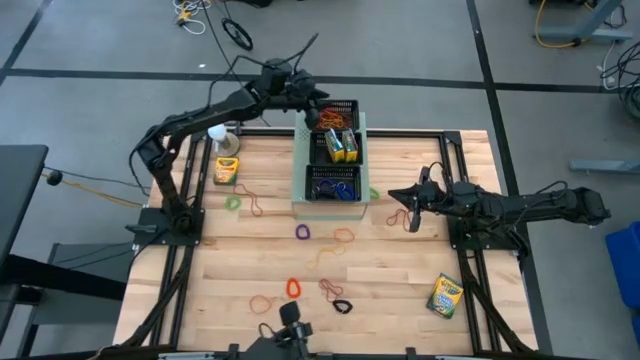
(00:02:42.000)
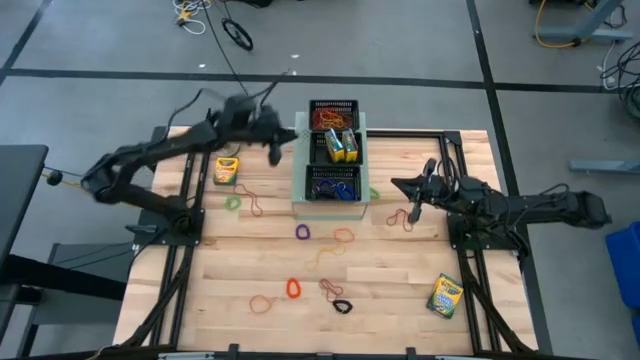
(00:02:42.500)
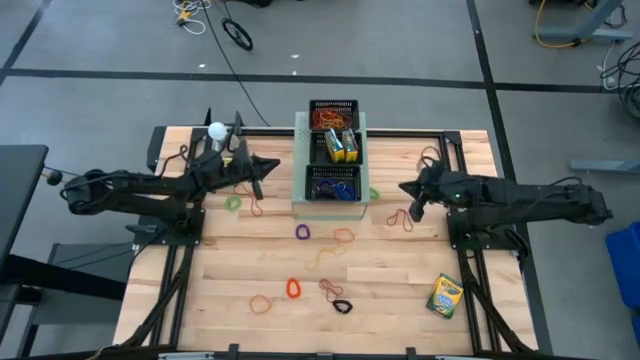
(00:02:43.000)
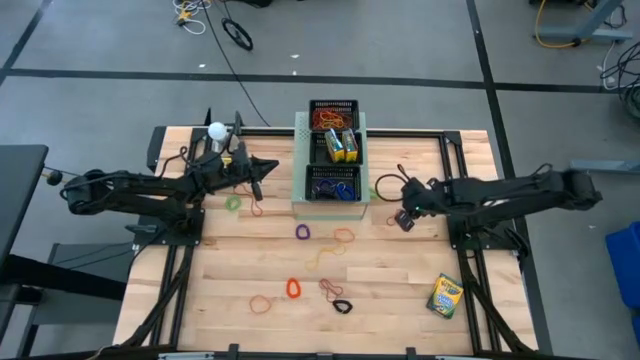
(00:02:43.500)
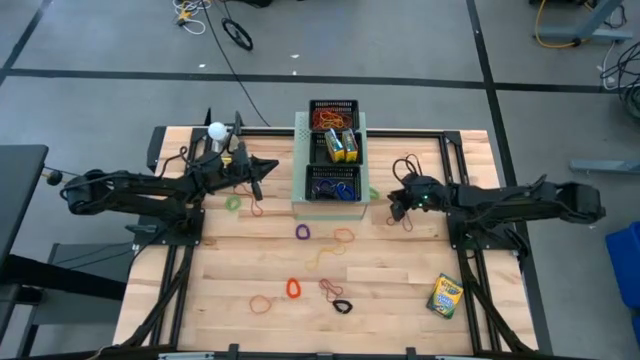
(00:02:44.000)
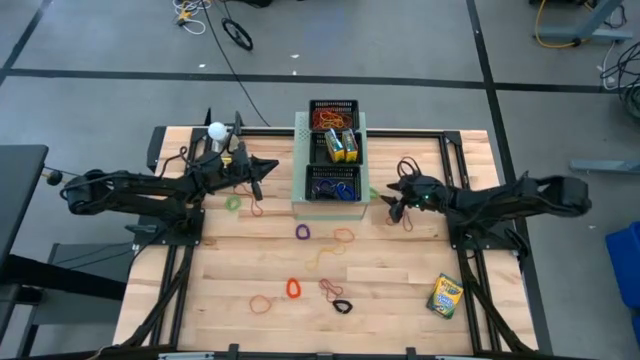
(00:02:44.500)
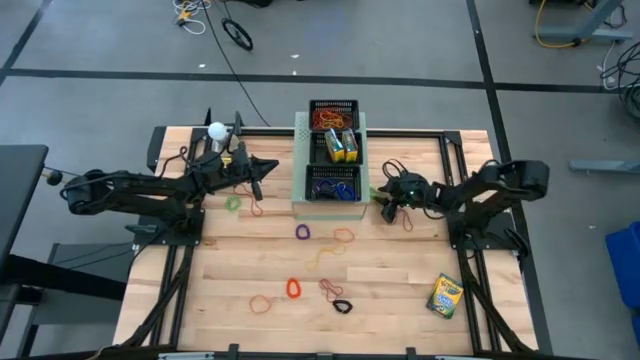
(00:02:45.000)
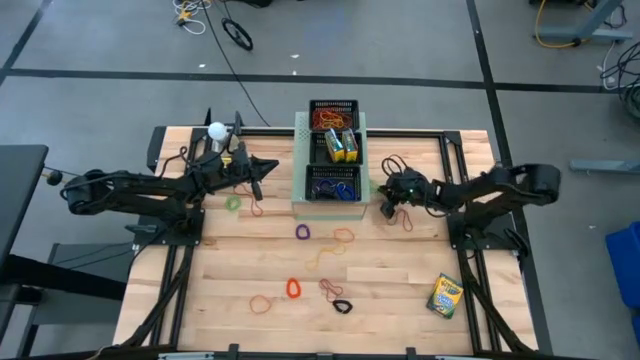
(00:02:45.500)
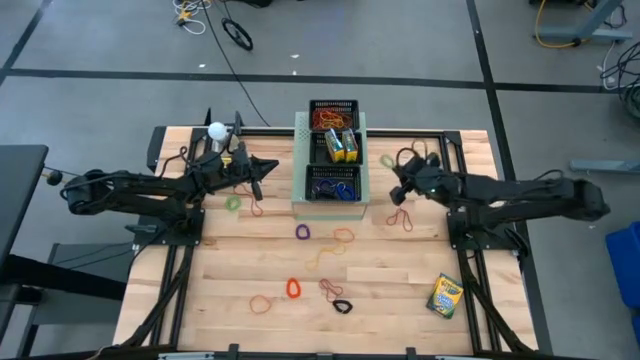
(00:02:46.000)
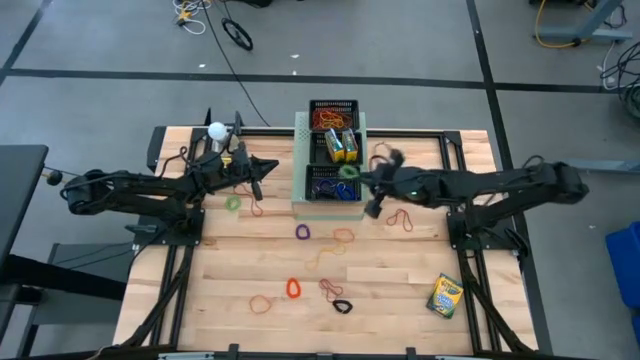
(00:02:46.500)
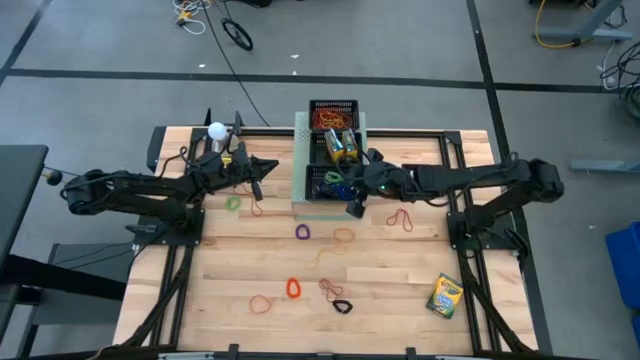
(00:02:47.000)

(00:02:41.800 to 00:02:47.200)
Task: Pick & Place Office Desk Supplies
Put the right green spring keychain into the bottom black bin on the shelf

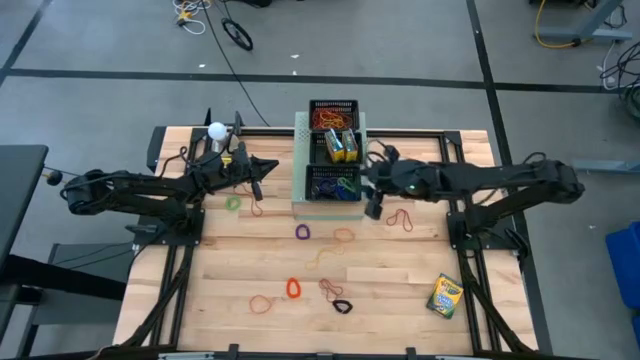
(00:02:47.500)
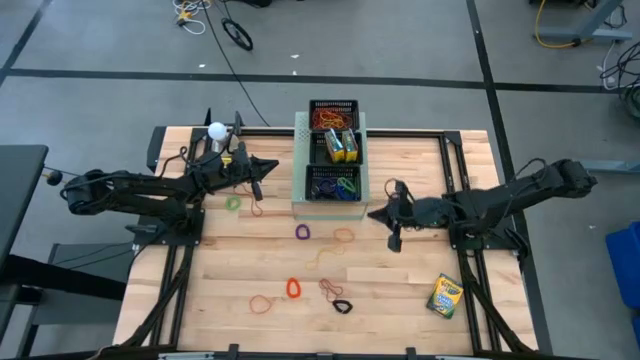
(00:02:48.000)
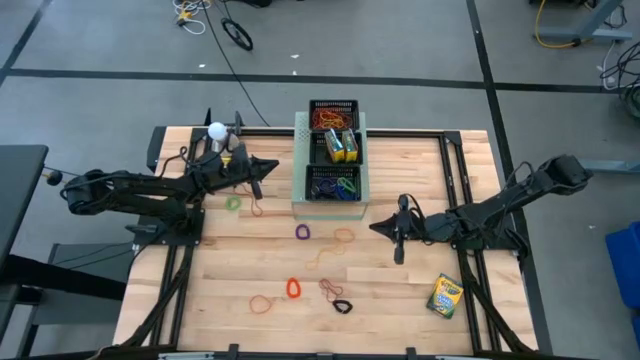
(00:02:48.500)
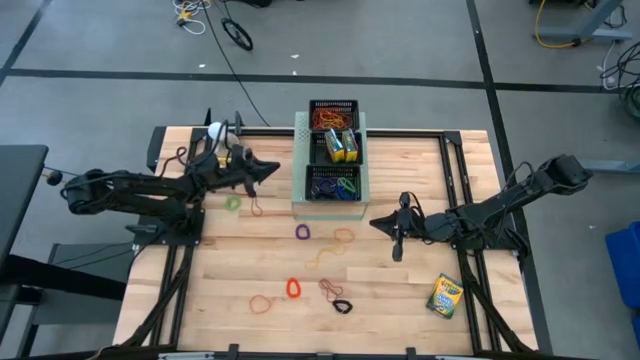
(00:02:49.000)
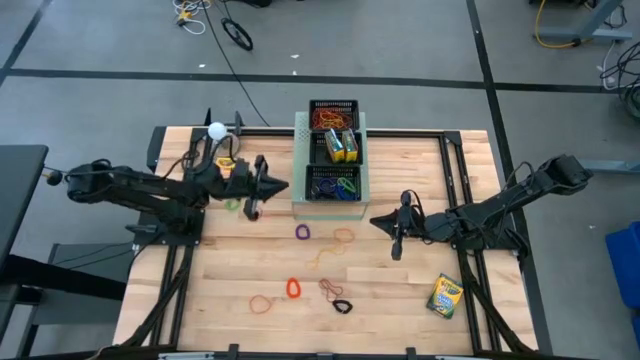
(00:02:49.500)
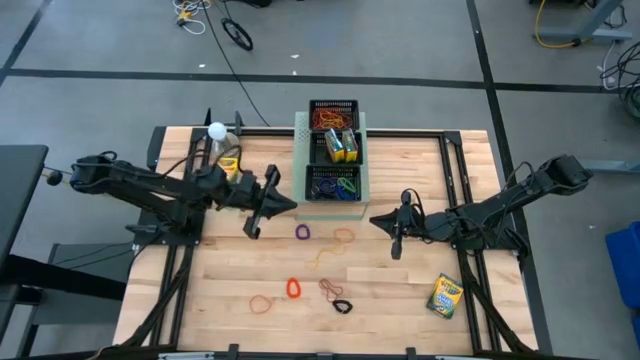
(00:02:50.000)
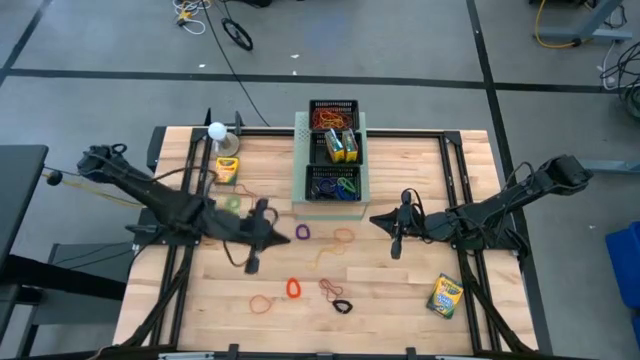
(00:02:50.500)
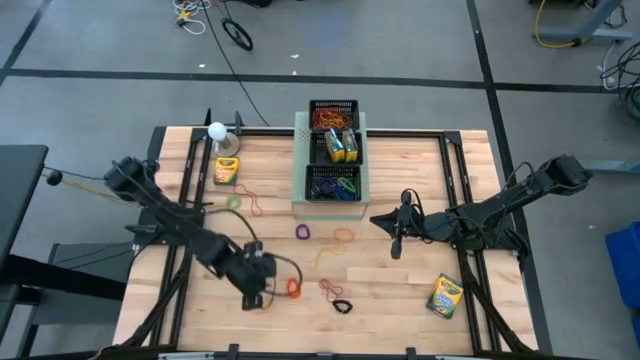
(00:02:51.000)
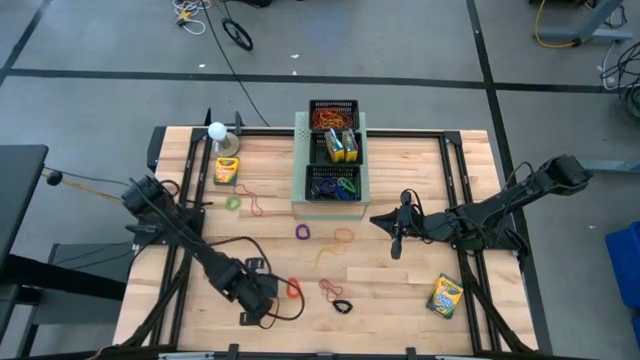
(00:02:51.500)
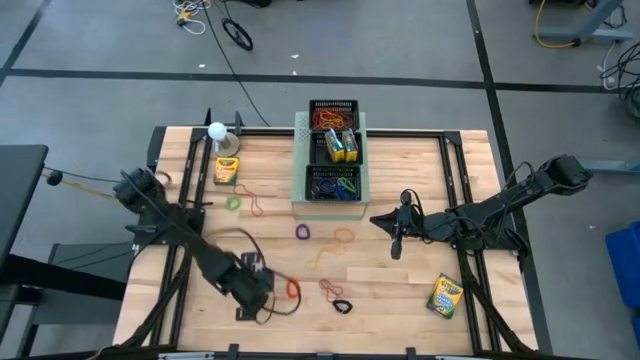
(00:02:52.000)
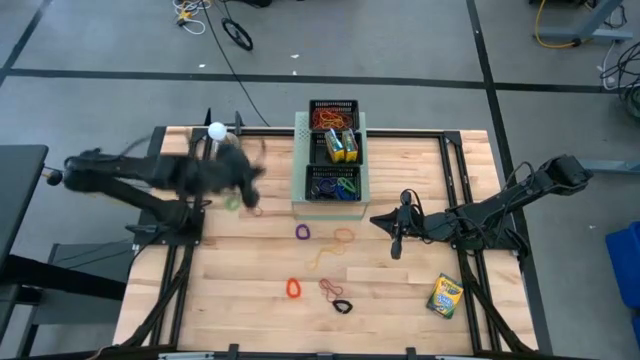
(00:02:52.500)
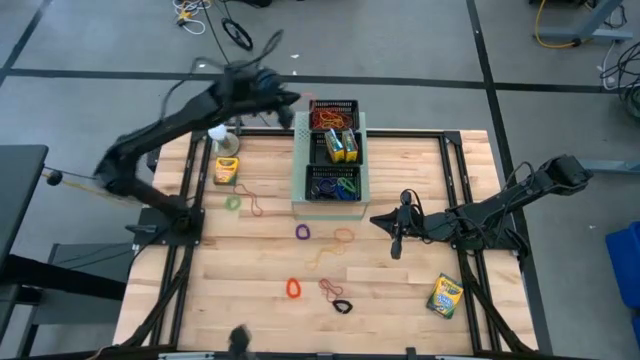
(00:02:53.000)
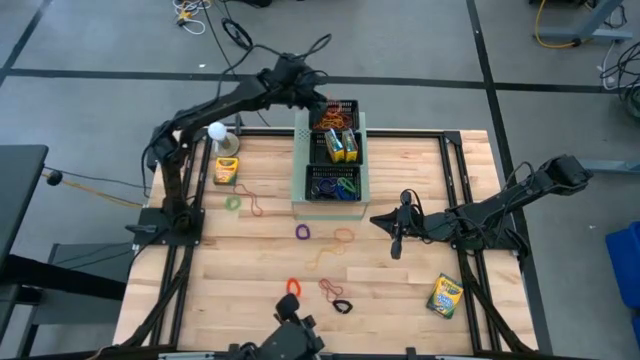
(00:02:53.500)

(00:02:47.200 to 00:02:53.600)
Put the bottom orange rubber band into the top black bin on the shelf

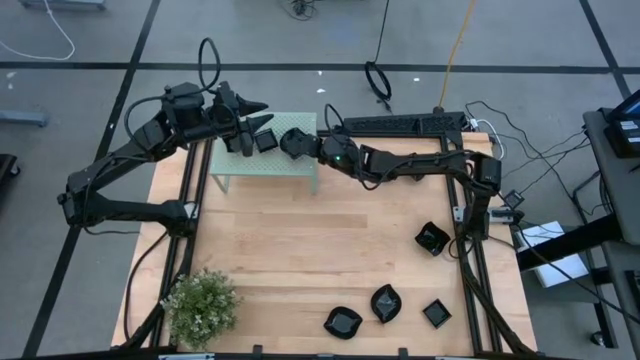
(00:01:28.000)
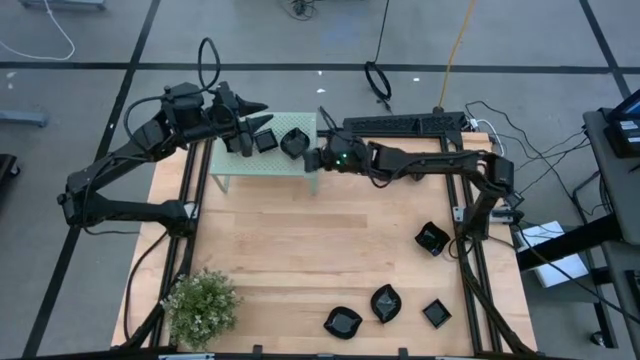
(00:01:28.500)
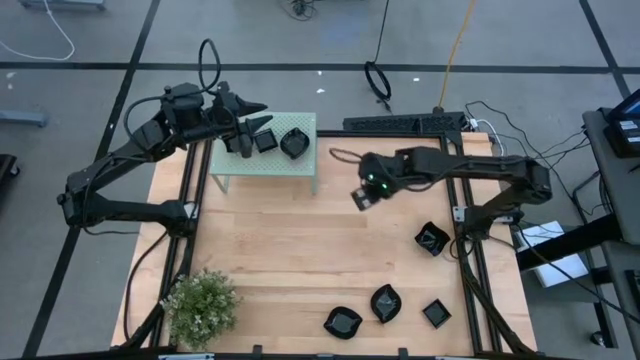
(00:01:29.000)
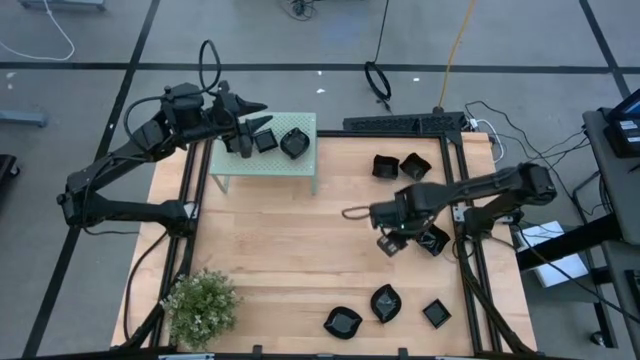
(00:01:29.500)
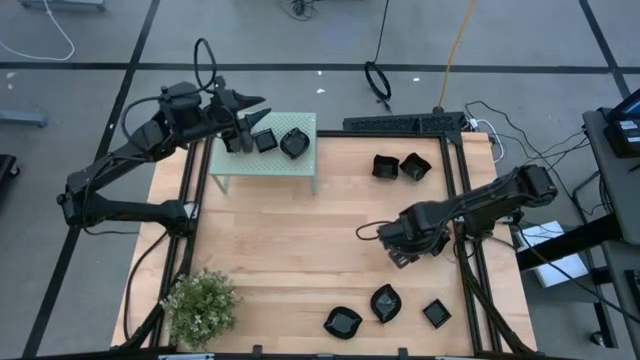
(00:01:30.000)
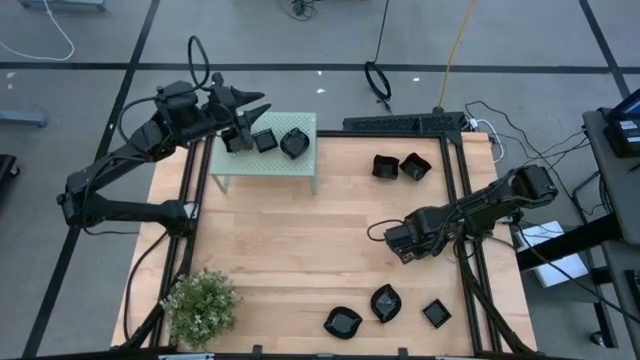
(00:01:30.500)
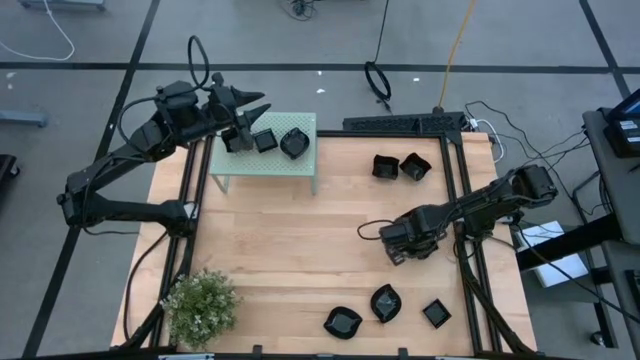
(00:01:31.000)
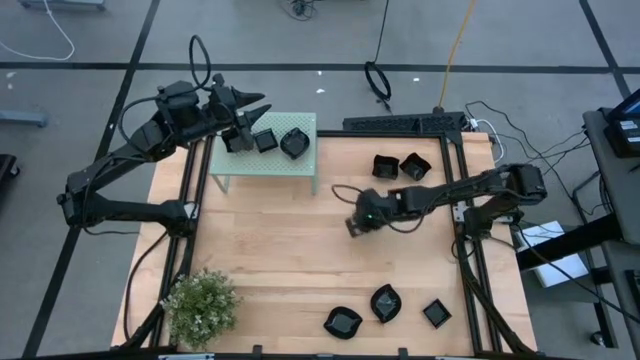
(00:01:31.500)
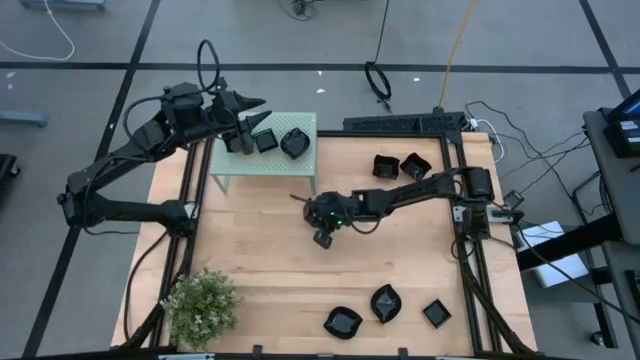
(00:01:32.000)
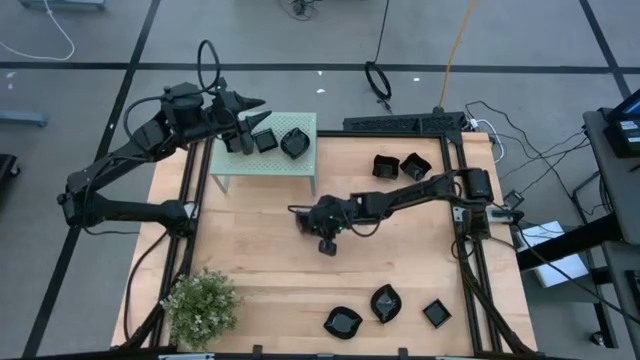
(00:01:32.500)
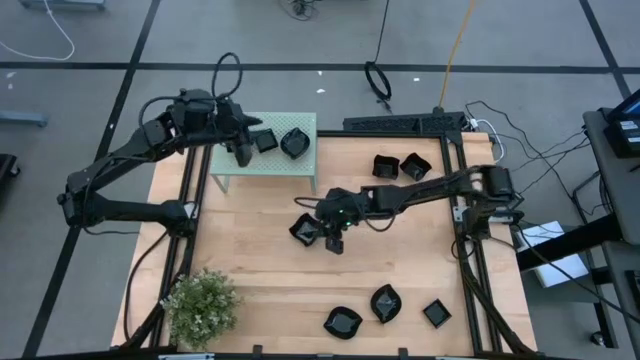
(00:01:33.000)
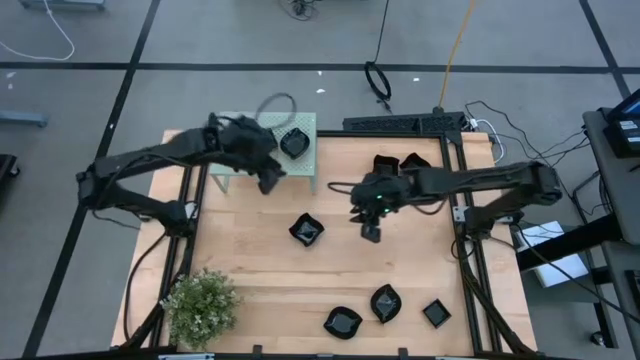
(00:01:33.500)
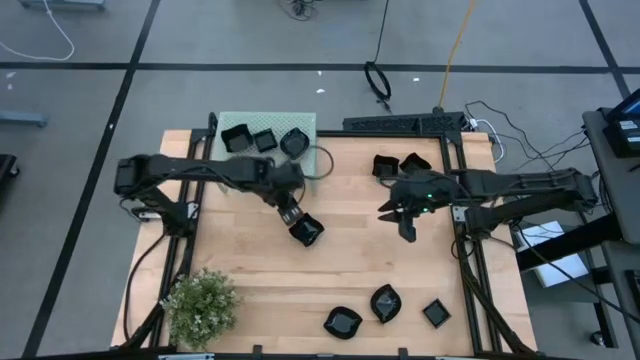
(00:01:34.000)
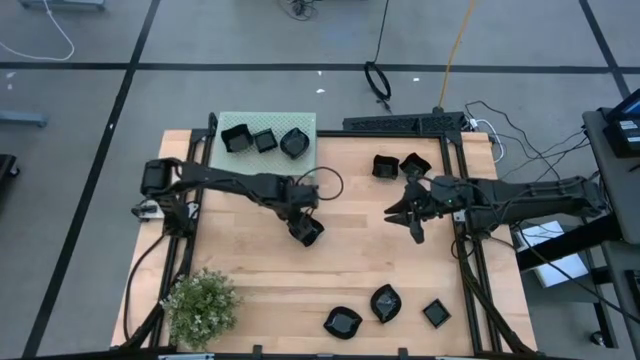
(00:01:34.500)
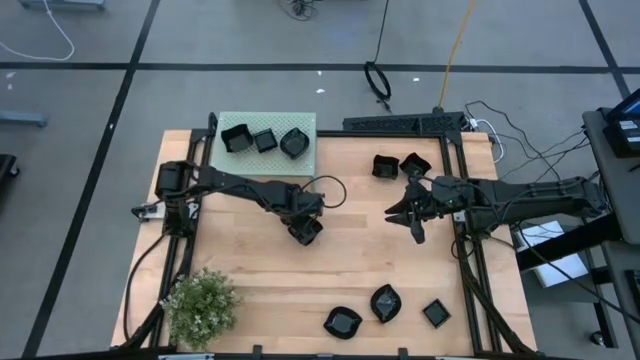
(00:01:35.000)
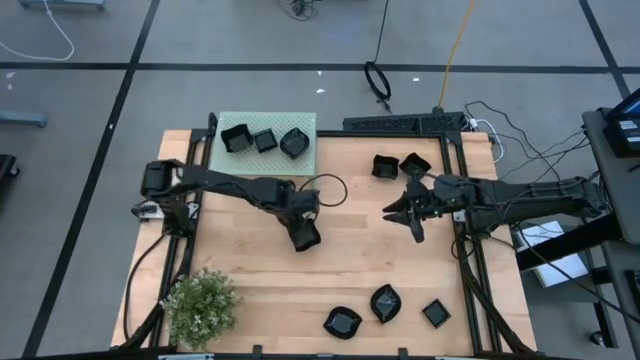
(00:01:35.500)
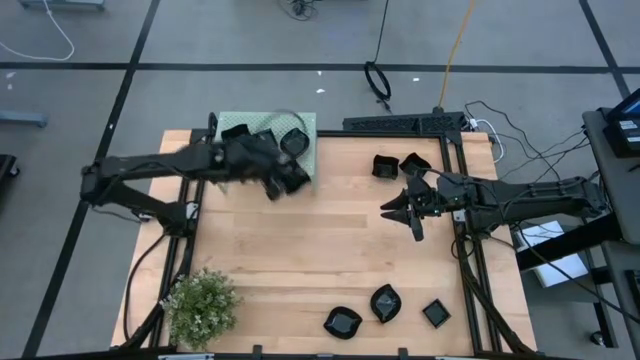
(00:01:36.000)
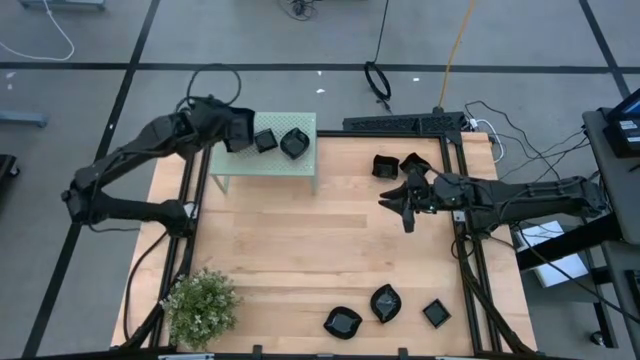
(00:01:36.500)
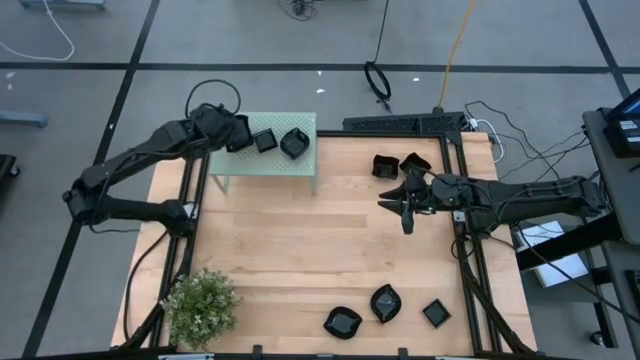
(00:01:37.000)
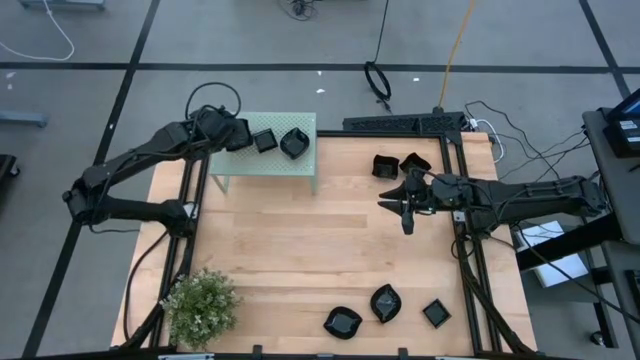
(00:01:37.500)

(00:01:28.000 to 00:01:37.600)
Task: Pick & Place Mini shaped plates
Stack the bottom distorted square plate on top of the distorted square plate on the shelf
